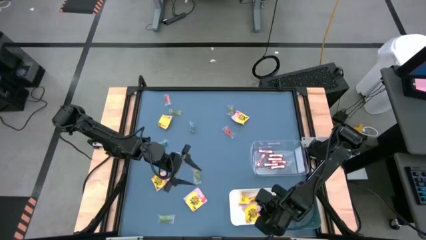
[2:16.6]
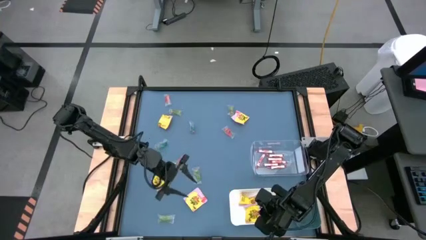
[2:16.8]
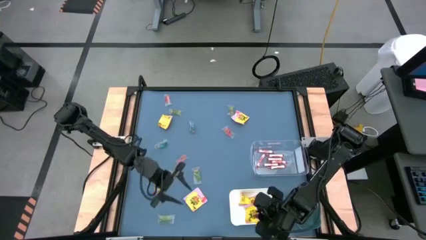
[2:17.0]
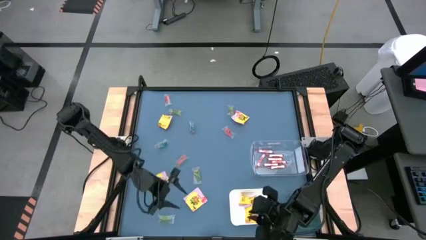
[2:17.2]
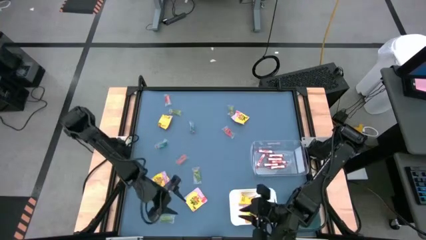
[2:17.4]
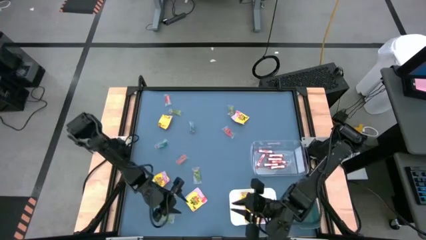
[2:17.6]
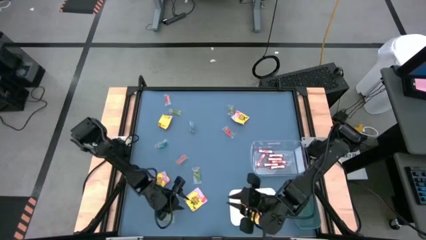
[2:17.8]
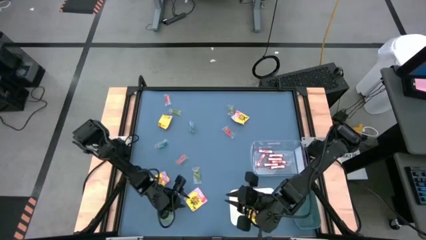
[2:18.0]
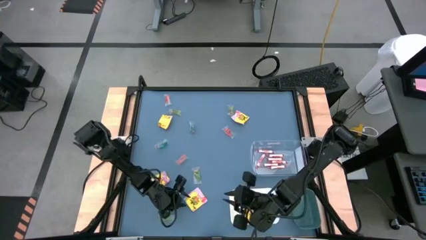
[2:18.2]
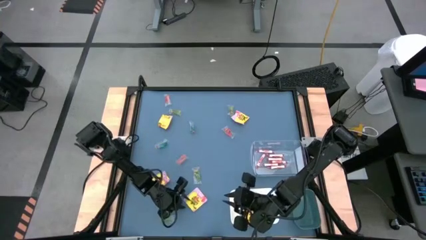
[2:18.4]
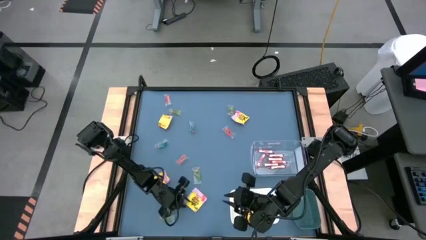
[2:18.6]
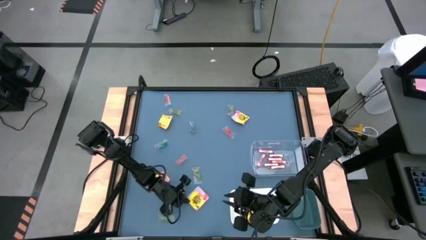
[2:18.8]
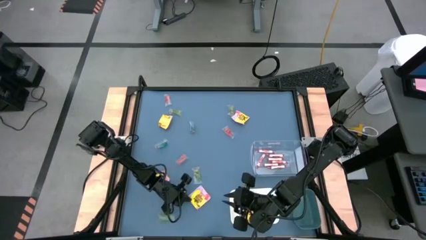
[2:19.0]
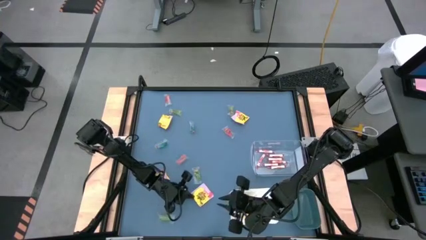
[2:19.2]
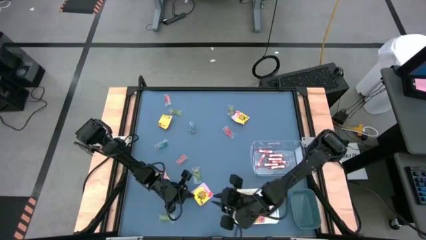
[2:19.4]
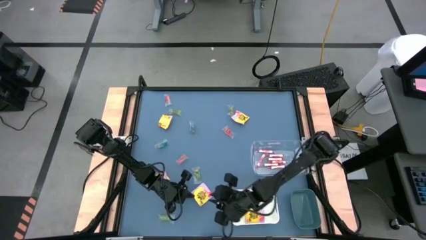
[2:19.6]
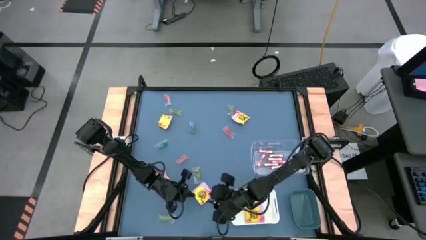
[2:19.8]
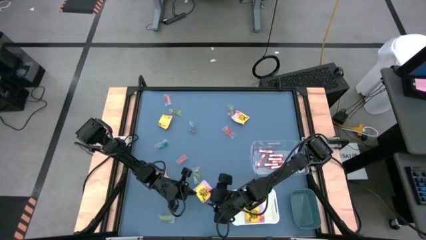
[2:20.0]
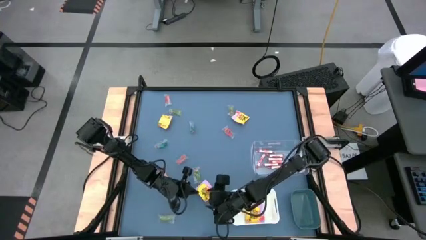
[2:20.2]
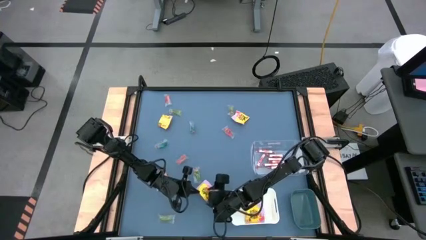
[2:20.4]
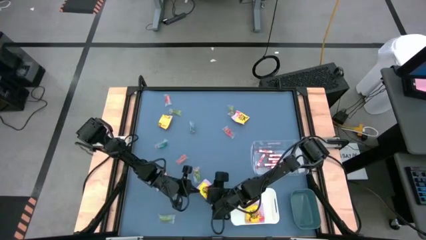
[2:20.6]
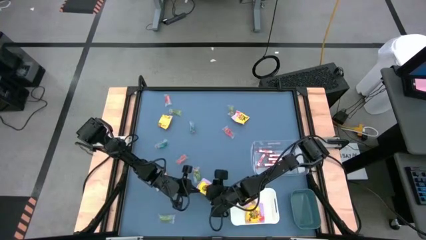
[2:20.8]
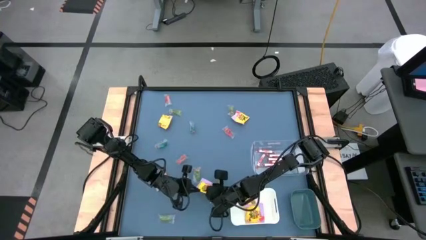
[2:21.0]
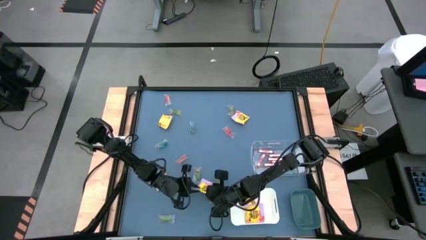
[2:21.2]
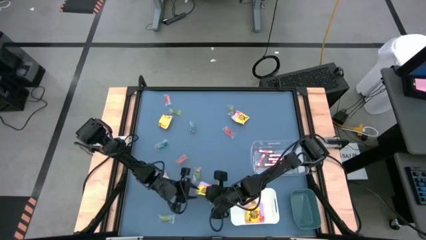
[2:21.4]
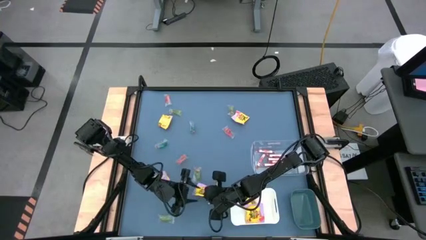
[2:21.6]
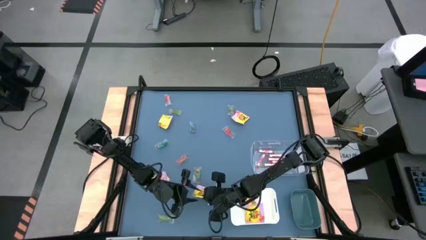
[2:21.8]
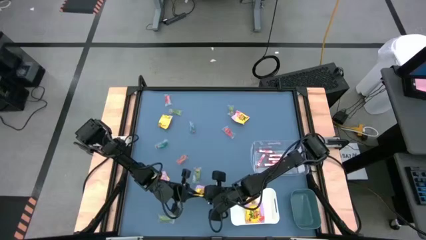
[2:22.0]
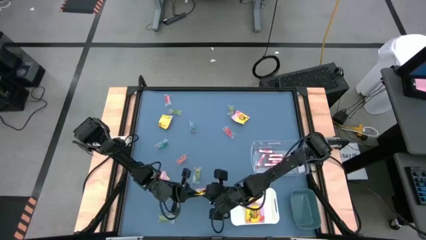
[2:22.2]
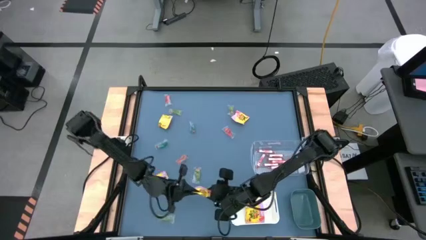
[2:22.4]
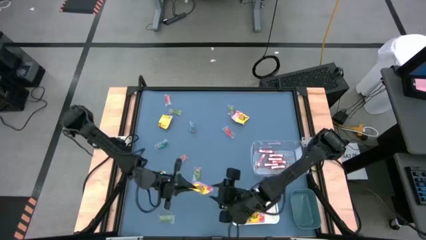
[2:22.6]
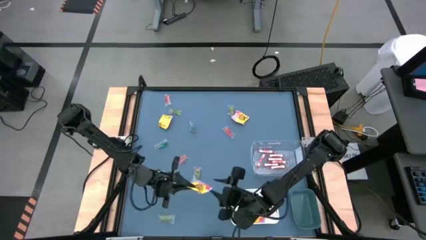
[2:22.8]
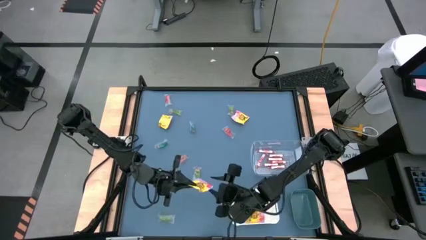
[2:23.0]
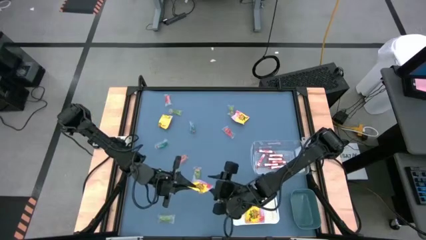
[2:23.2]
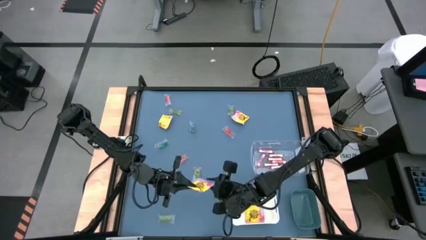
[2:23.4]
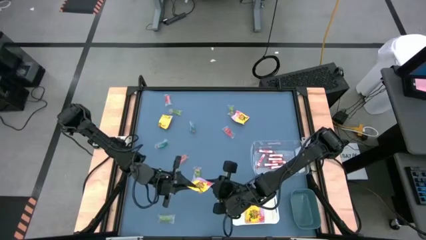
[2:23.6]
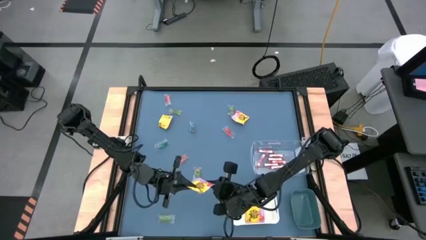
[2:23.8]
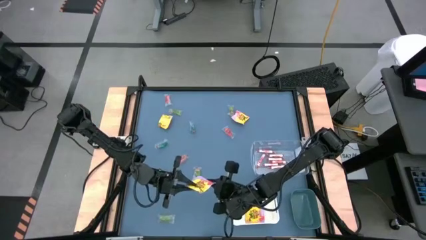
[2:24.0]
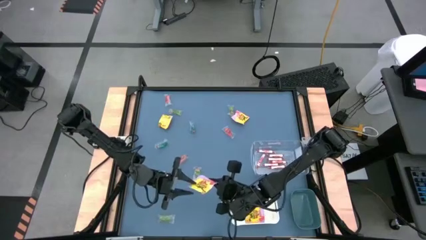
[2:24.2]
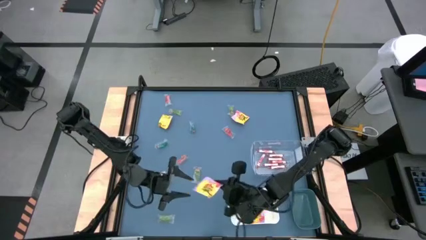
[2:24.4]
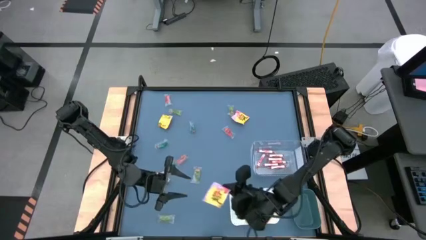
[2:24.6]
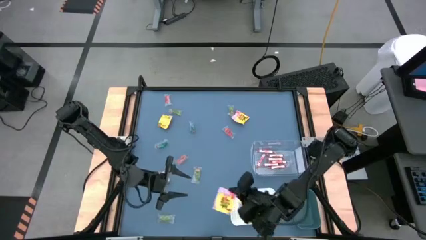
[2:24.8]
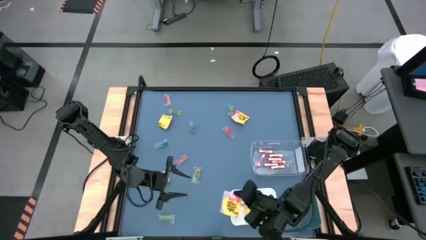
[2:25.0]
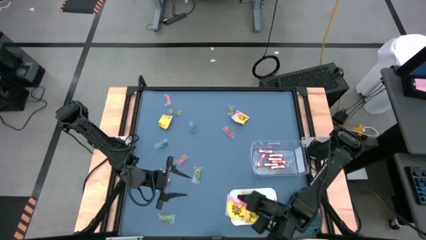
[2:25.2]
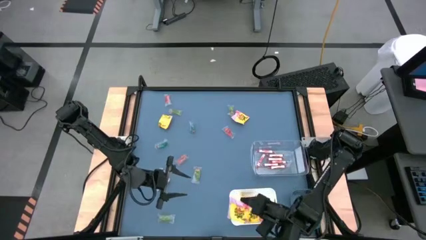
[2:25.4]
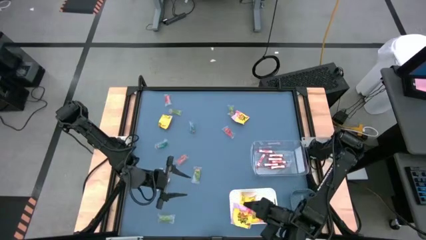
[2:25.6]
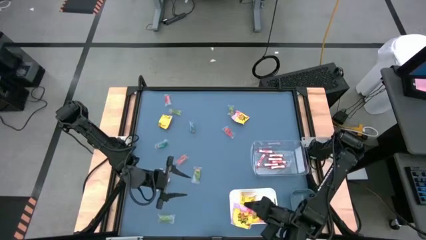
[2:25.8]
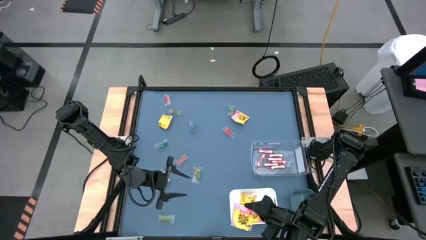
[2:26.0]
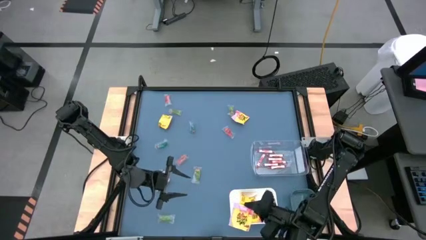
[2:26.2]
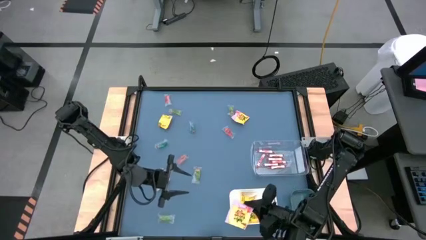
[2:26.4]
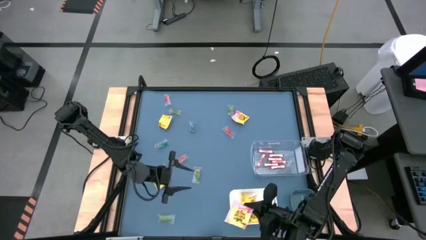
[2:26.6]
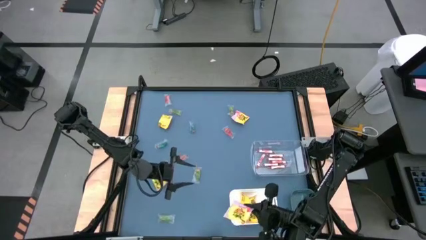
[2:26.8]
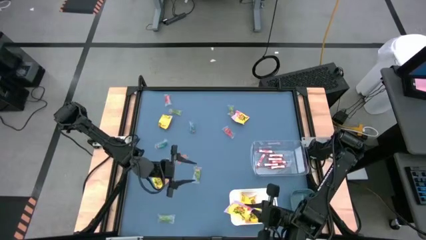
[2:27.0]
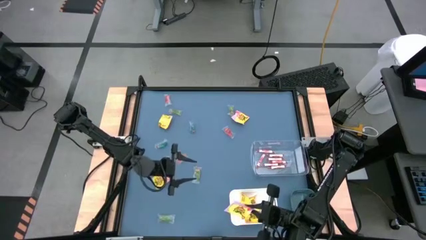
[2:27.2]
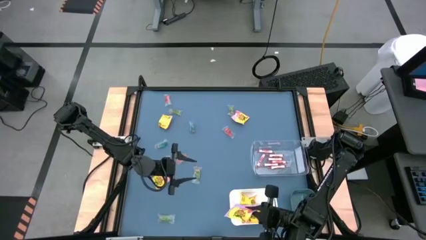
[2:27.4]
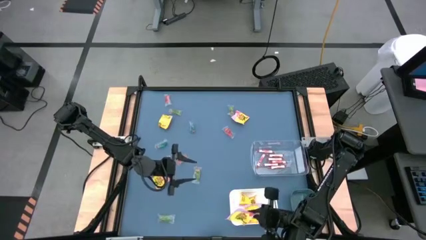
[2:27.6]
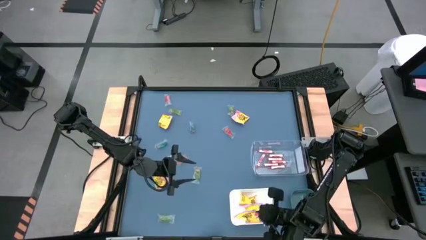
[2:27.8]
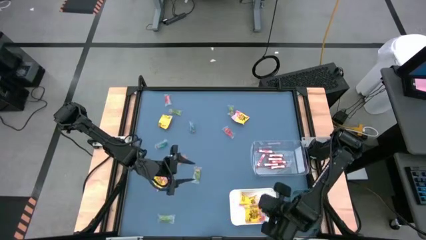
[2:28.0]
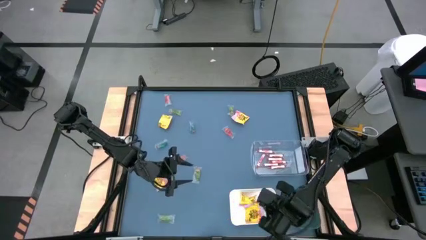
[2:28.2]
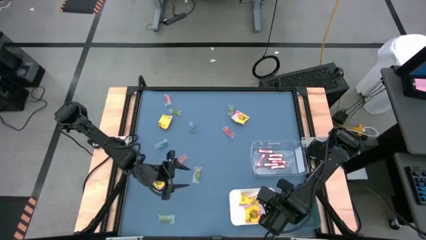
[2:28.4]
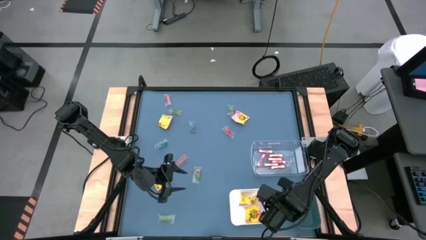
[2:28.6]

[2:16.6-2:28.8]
Task: Sort candy
Put the yellow candy into the white bin

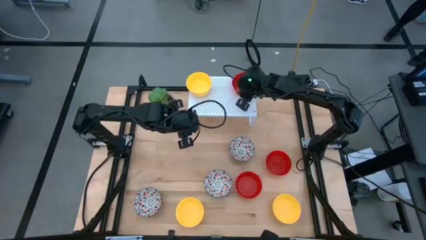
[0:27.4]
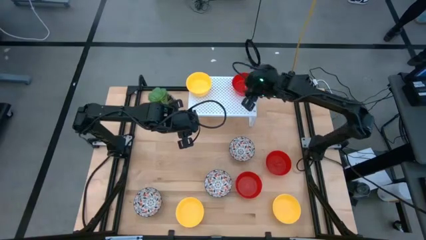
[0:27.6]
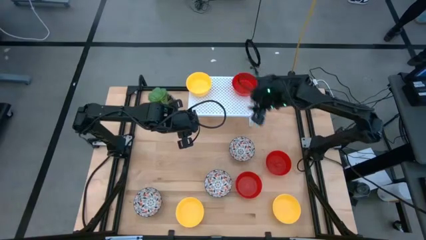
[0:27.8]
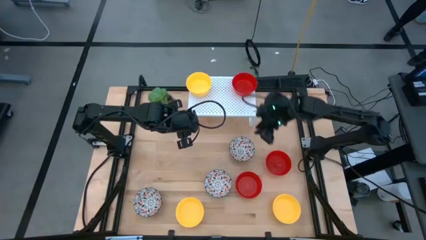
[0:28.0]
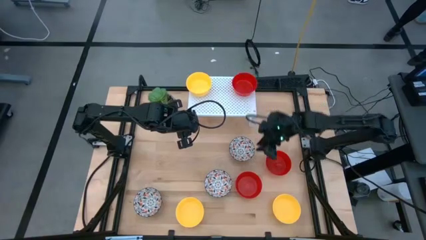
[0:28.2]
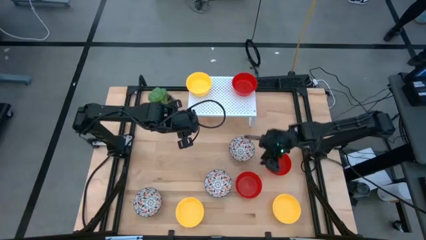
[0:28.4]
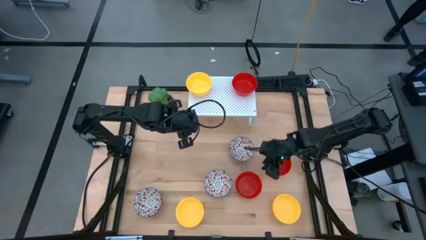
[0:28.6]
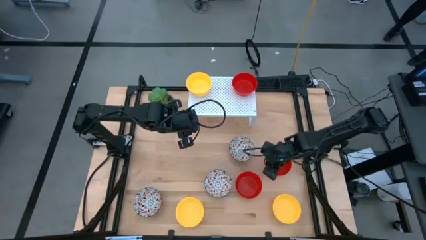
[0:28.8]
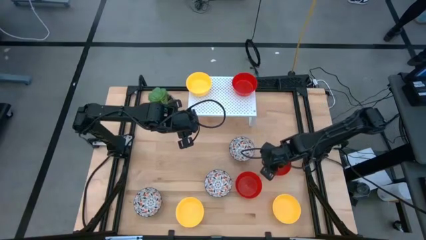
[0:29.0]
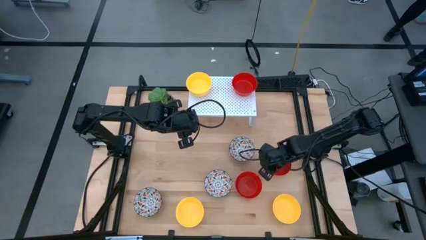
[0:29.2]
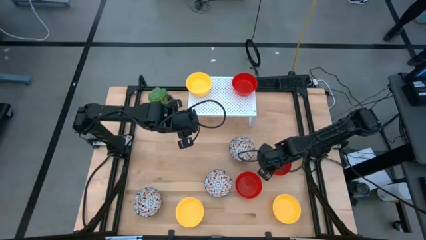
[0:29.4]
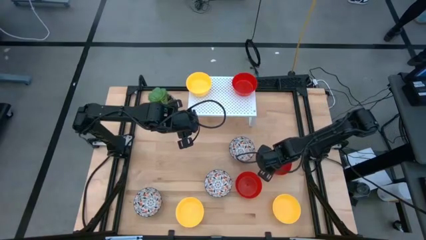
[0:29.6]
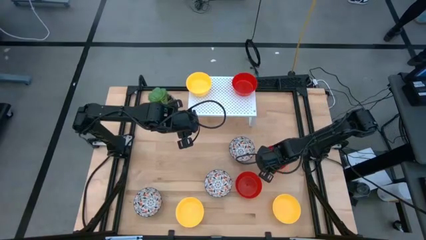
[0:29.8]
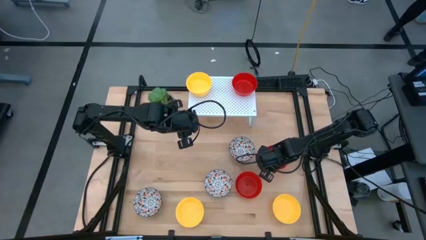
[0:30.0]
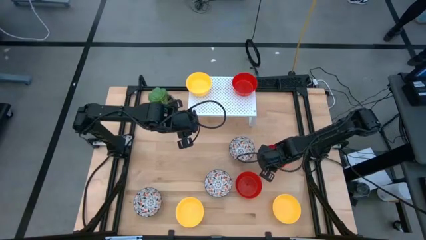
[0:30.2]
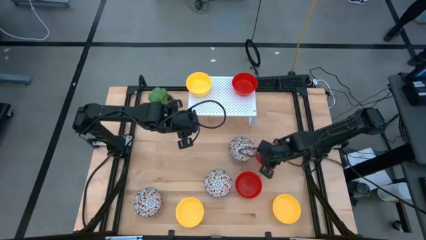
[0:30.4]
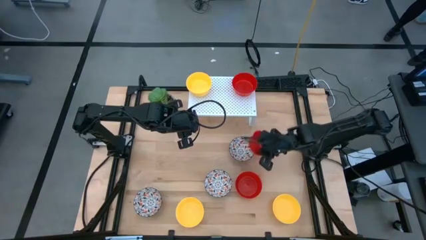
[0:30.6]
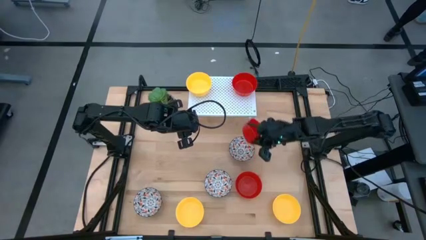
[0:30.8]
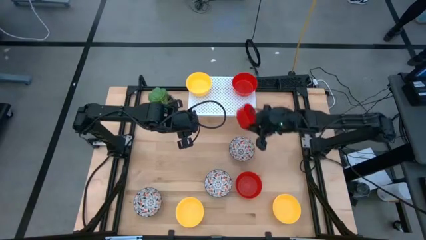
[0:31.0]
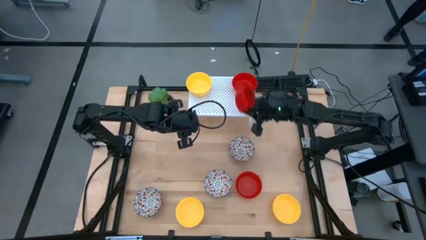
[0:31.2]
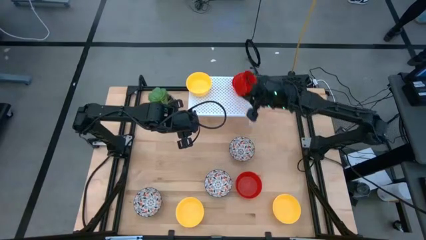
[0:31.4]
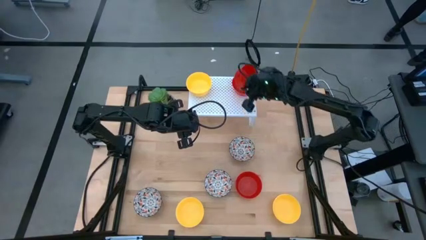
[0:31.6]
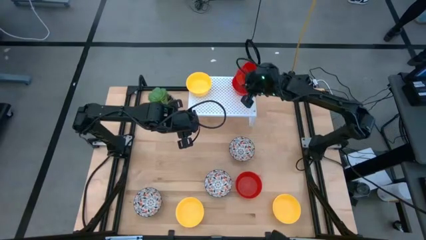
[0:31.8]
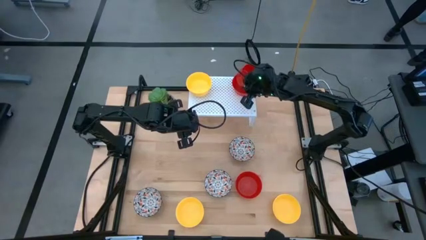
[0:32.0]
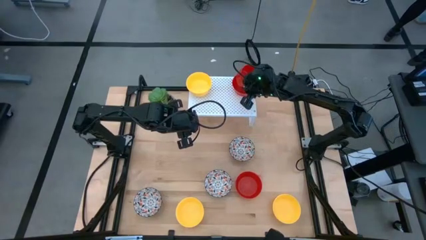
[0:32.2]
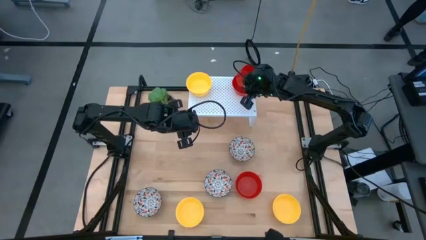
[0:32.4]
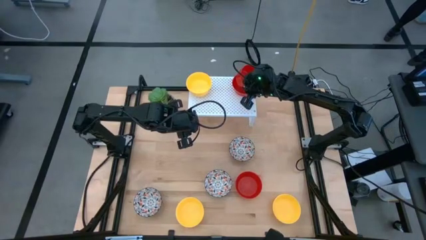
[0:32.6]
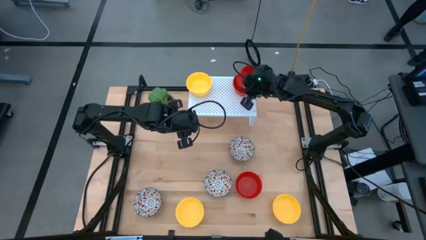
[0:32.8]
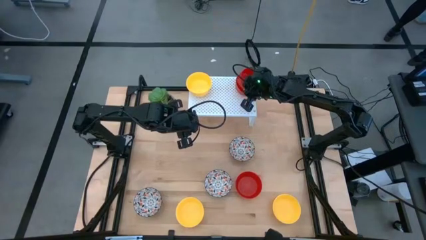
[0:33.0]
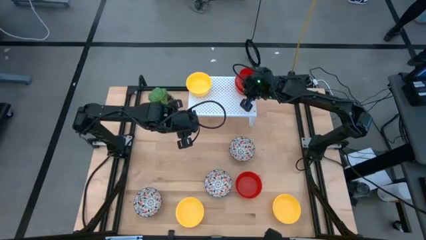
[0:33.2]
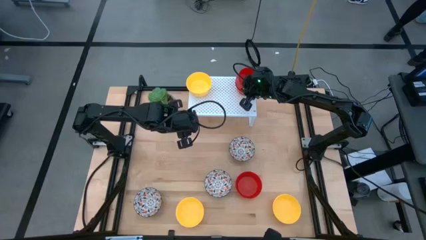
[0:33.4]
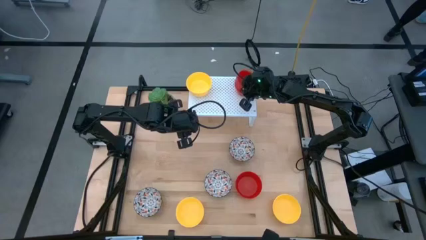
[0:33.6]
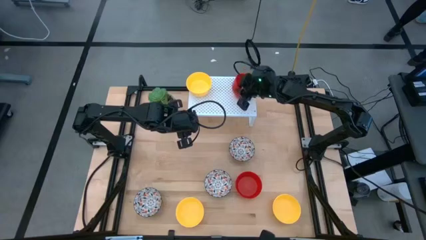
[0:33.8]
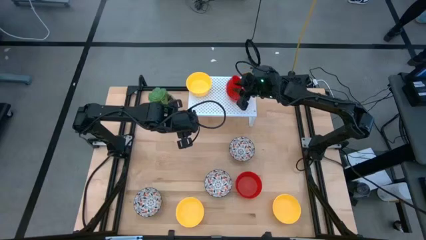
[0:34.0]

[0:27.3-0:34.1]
Task: Pick & Place Mini bowls
Stack the red bowl on top of the red bowl on the shelf
